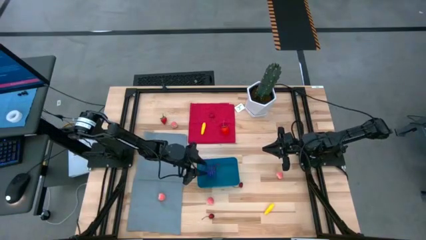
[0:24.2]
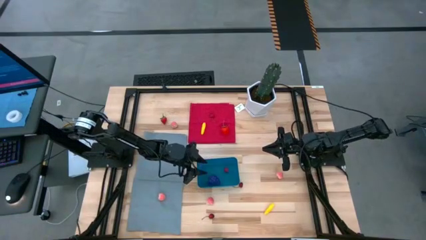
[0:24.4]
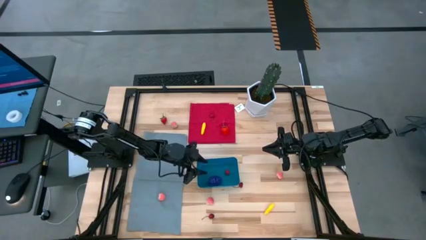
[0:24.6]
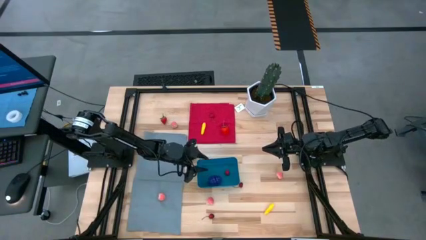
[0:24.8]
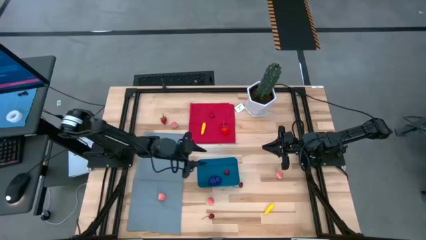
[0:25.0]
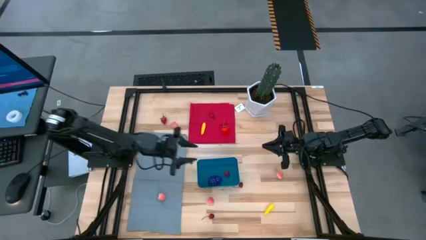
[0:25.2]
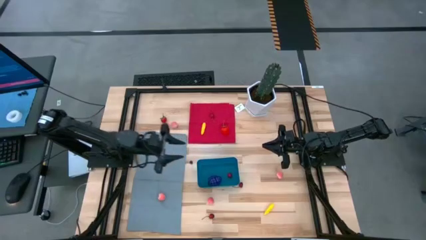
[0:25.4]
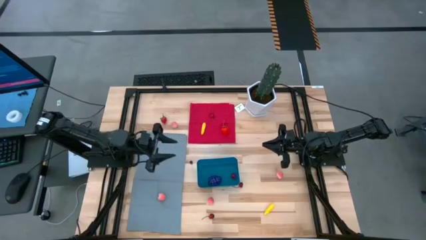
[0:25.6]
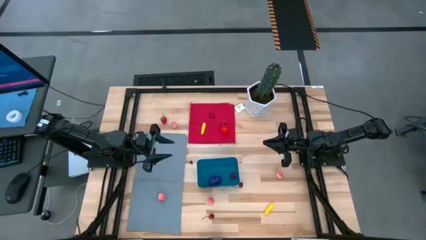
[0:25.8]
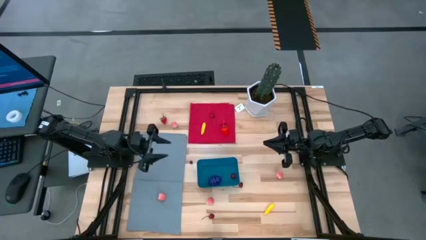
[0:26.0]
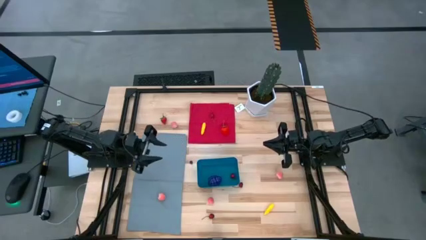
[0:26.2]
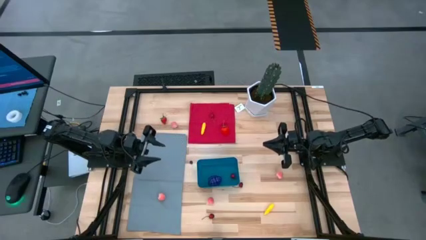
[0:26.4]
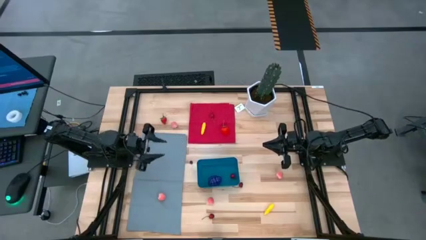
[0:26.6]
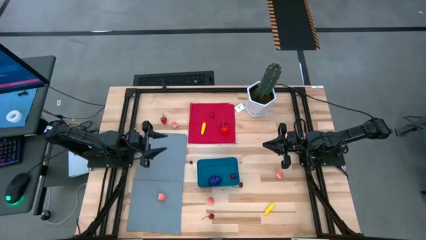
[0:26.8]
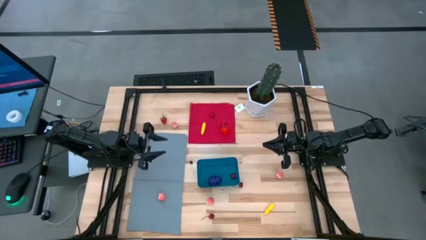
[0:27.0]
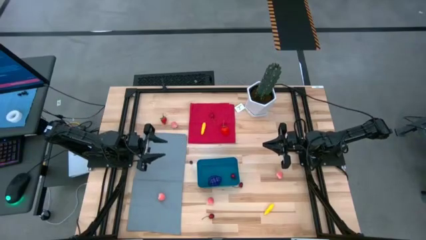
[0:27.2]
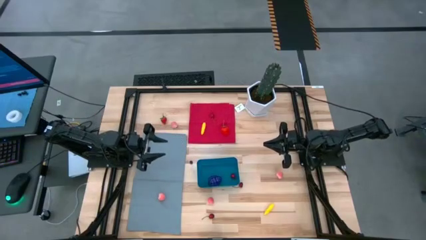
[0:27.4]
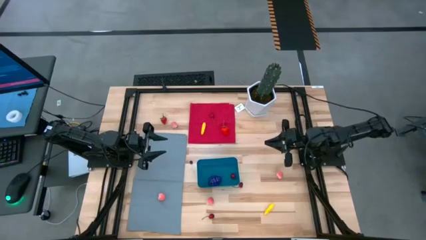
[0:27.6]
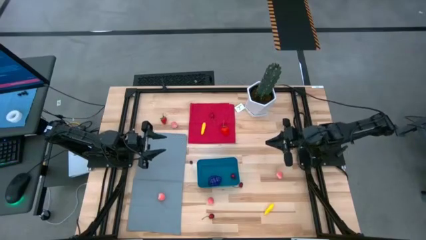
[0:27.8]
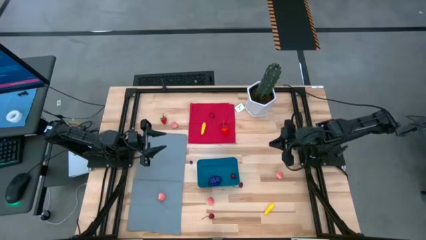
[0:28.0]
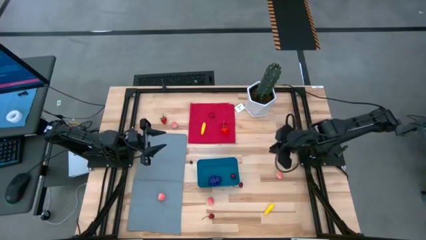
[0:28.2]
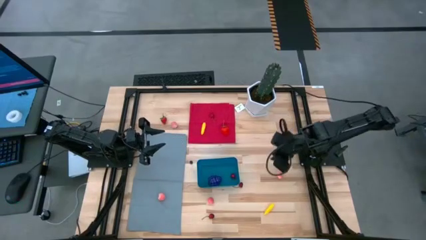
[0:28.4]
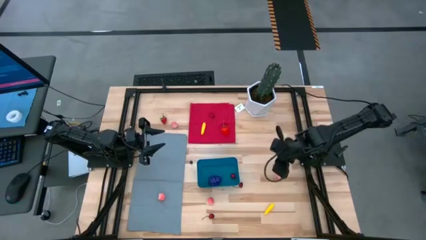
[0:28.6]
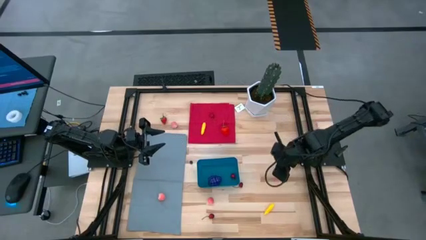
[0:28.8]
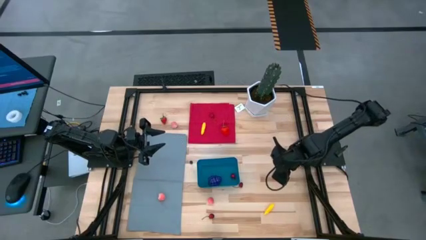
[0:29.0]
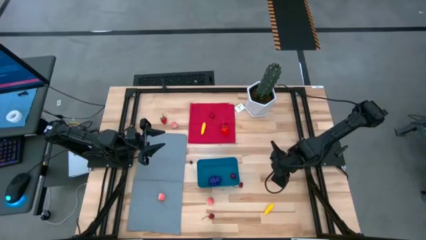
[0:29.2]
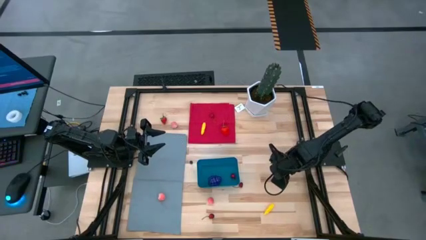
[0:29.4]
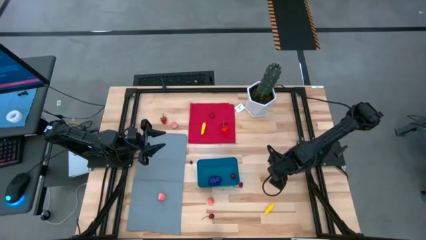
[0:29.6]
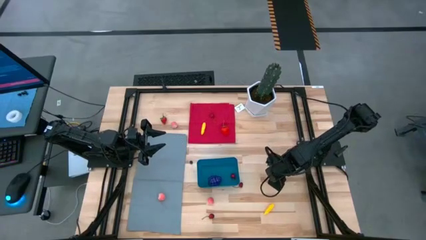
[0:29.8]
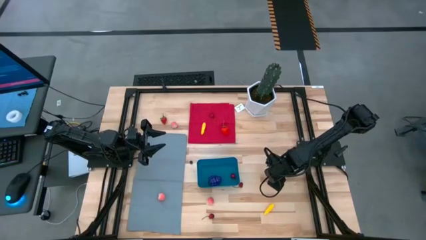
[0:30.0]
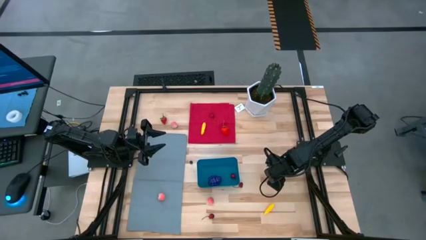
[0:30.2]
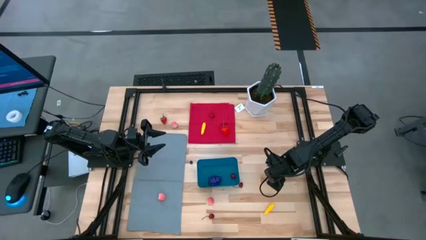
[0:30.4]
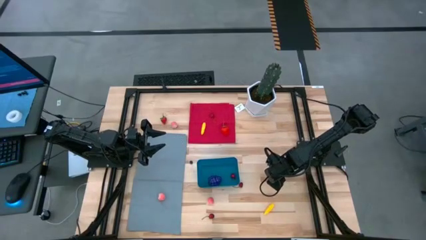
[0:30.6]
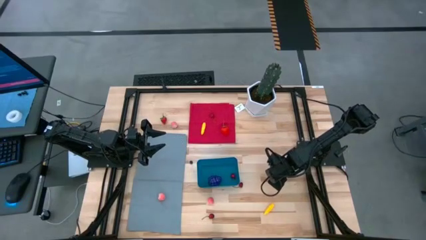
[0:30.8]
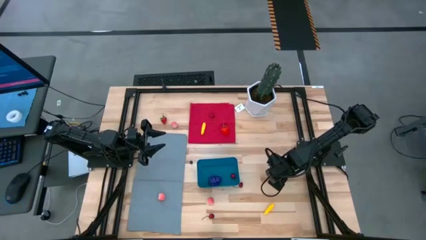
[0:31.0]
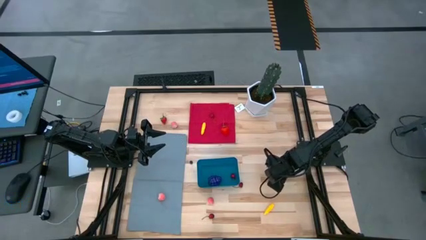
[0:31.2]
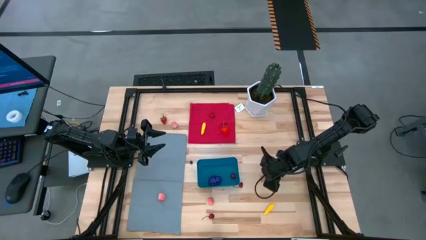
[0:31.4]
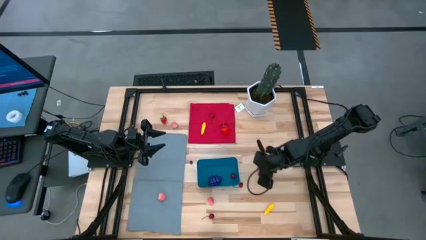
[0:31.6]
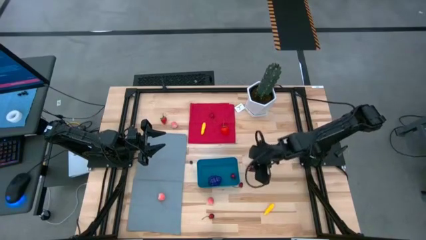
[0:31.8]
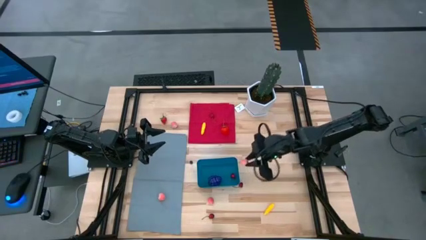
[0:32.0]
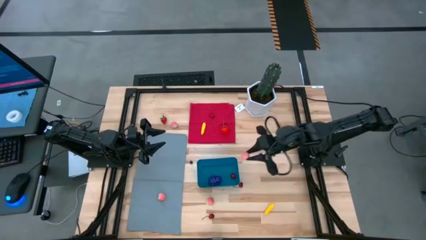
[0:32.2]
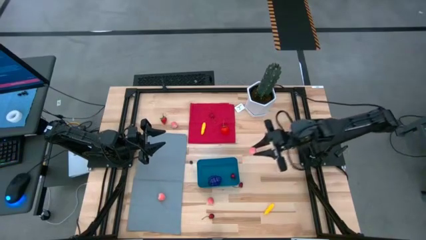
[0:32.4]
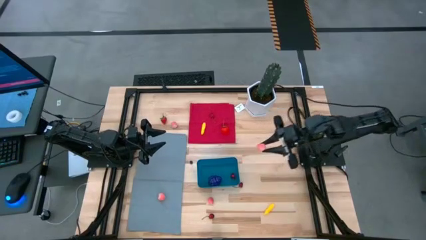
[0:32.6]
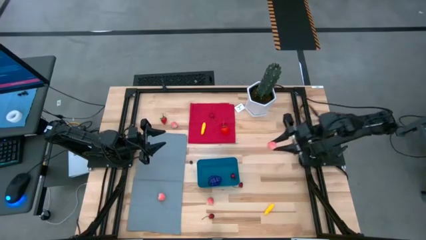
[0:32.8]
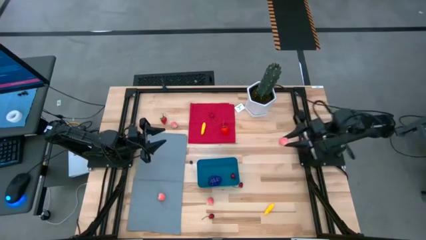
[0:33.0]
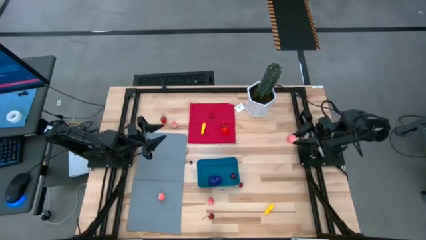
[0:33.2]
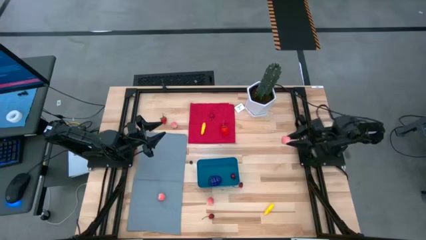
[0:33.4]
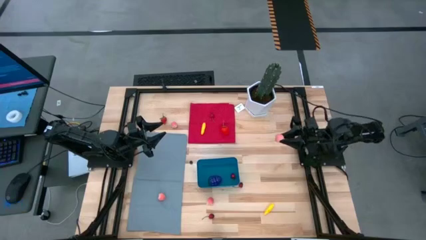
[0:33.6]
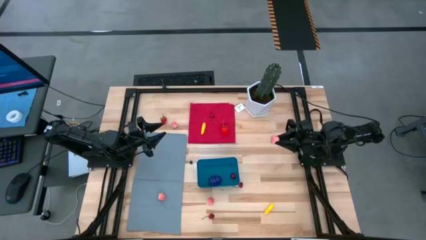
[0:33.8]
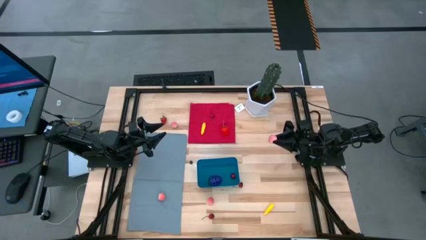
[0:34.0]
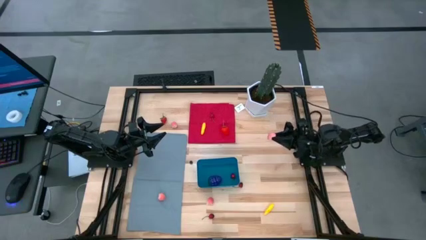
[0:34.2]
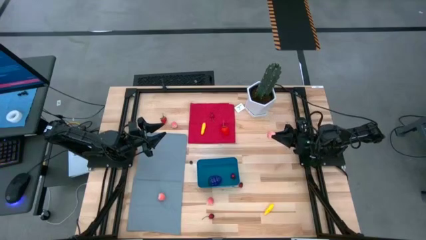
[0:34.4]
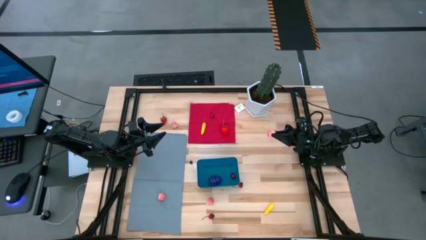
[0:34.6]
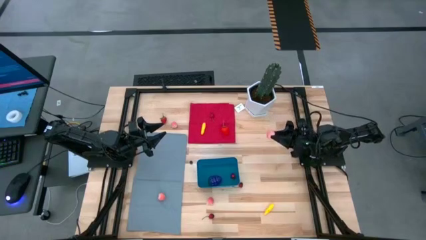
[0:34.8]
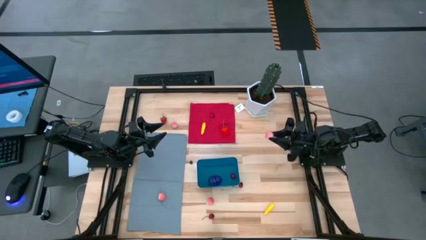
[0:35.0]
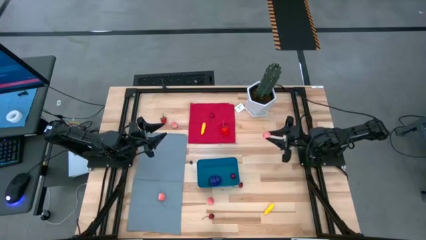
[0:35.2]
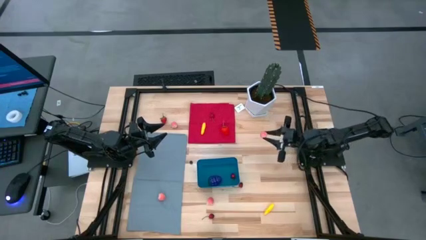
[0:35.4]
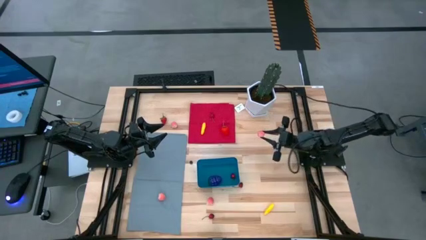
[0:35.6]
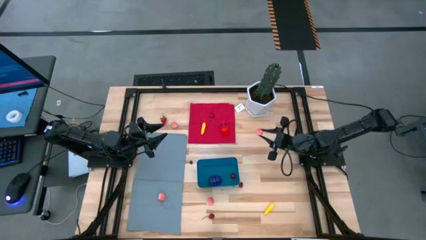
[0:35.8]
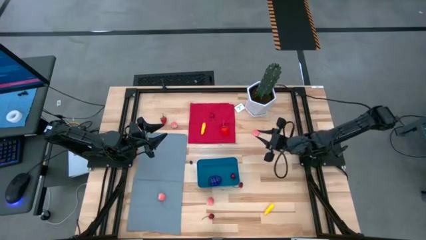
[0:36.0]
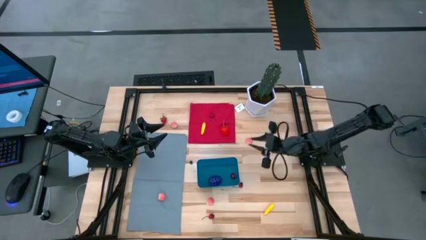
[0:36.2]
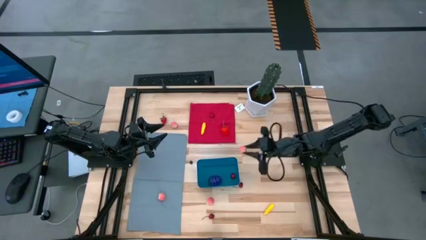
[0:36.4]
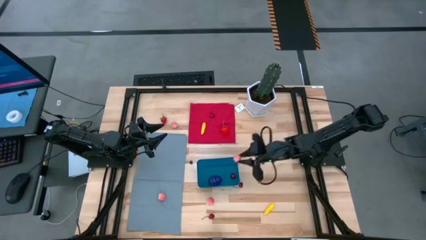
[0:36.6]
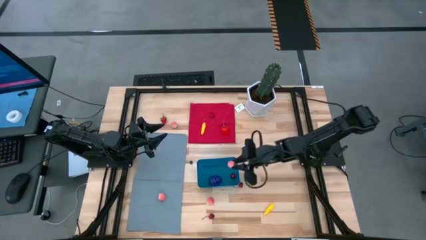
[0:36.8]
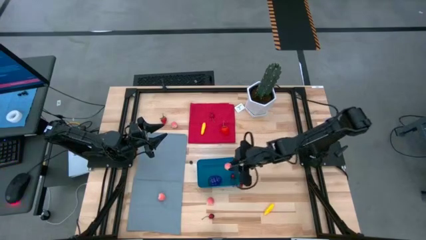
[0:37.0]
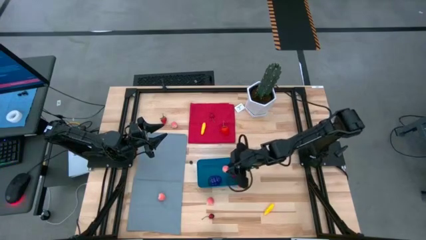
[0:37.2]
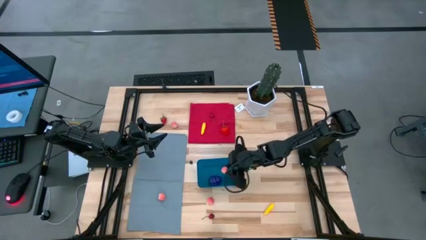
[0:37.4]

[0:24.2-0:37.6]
Task: Pick and placing Produce into tupperware
Put the peach into the blue bin
